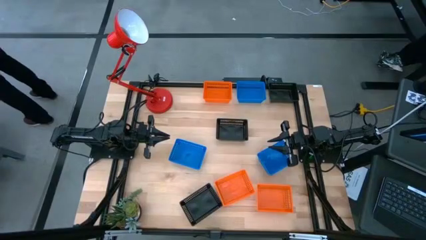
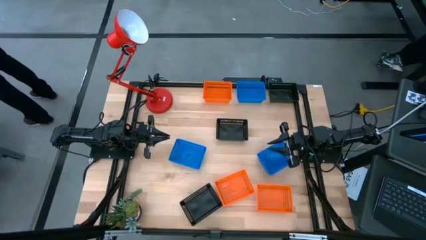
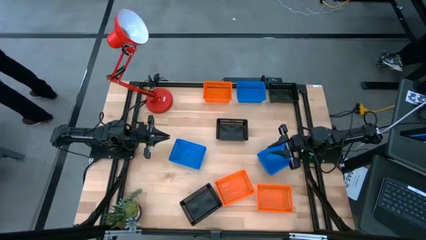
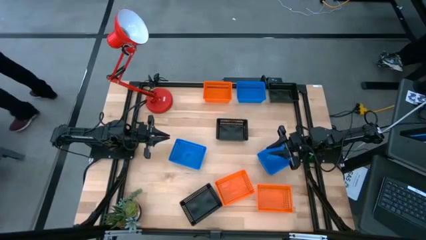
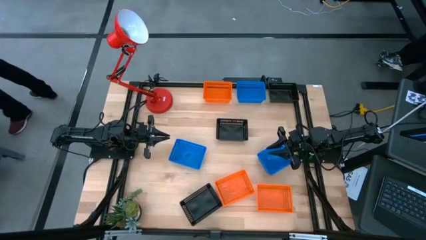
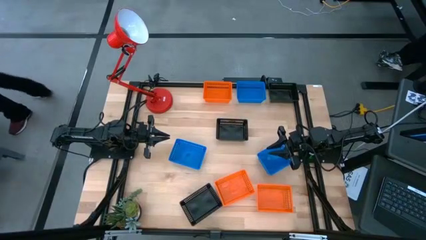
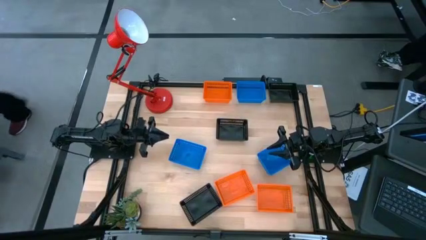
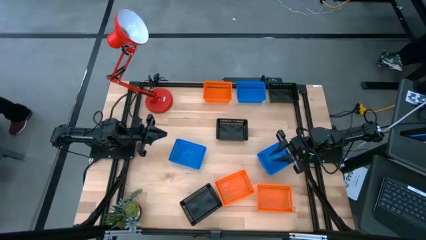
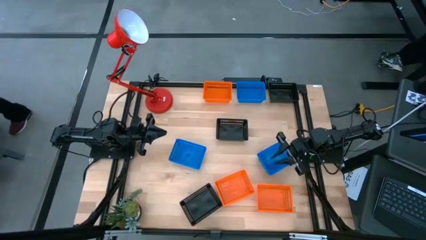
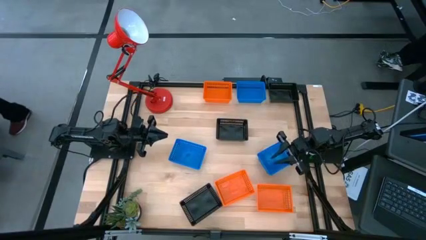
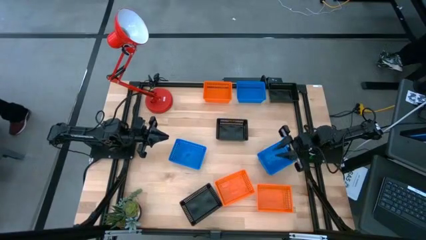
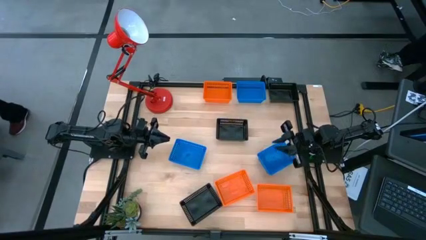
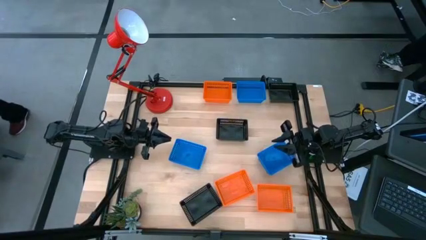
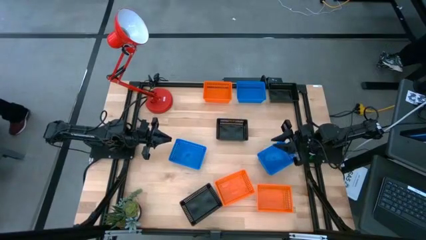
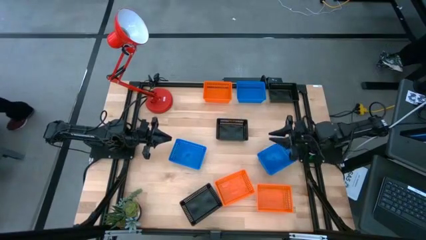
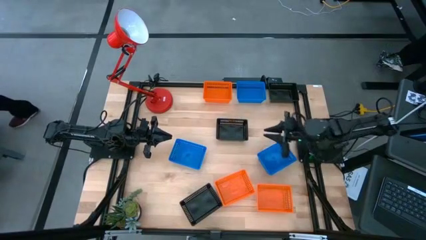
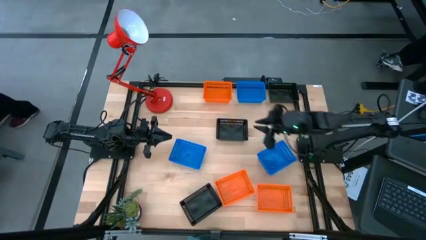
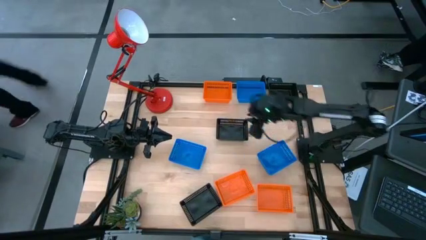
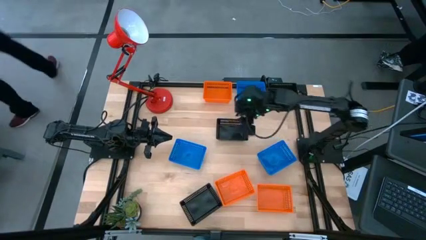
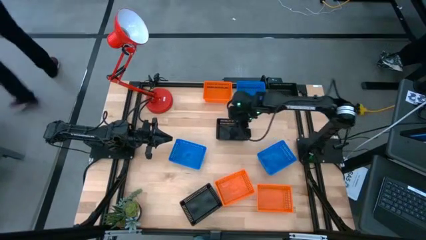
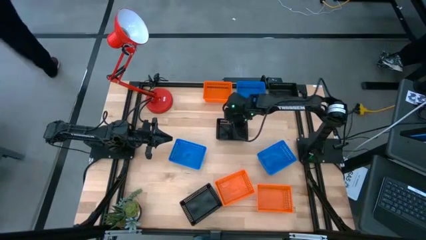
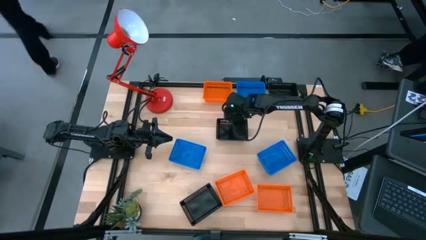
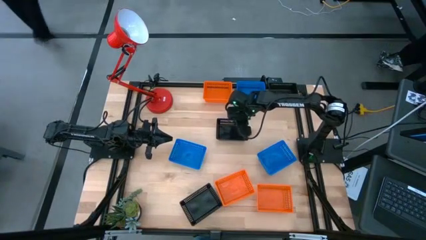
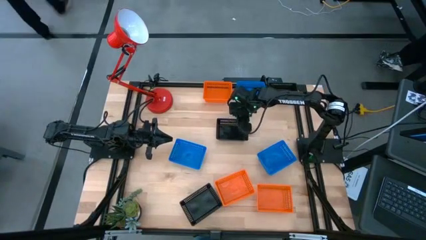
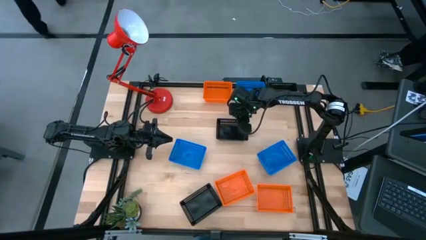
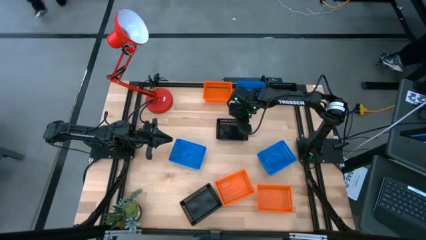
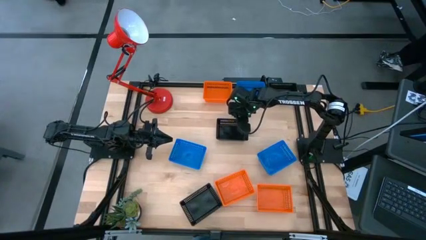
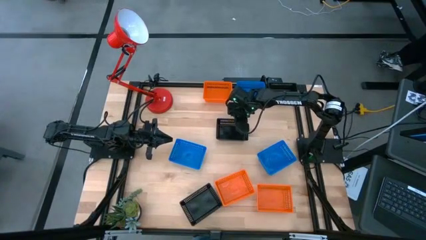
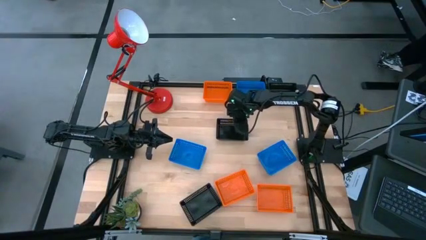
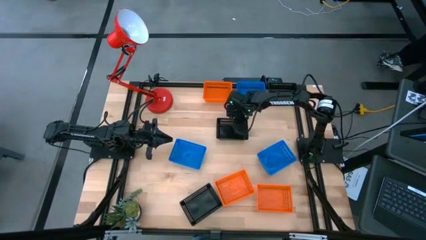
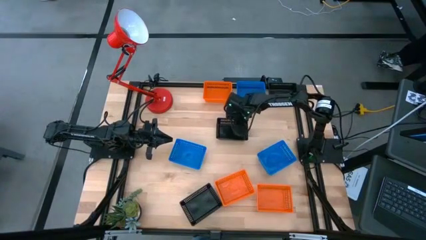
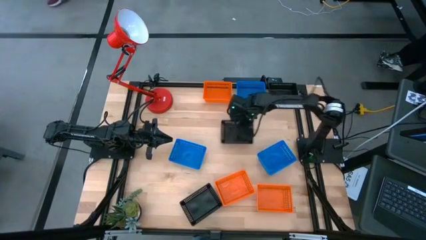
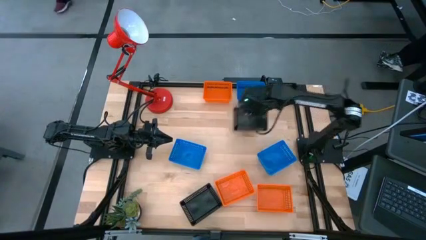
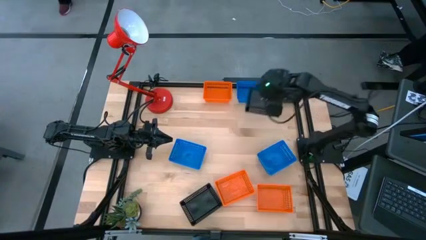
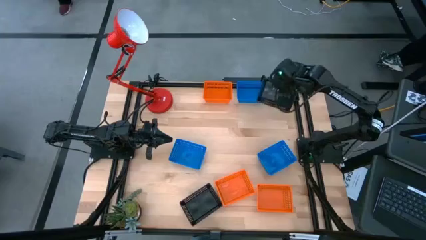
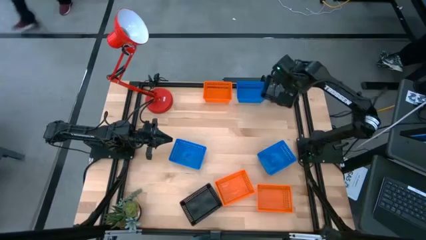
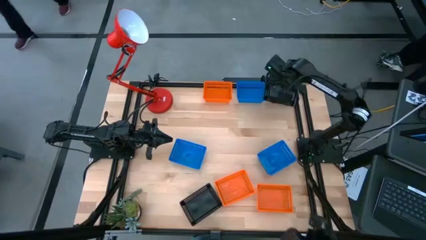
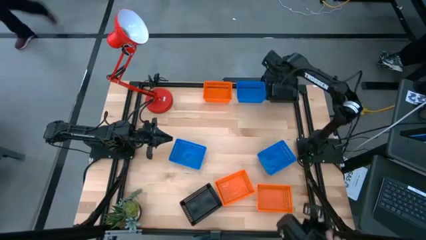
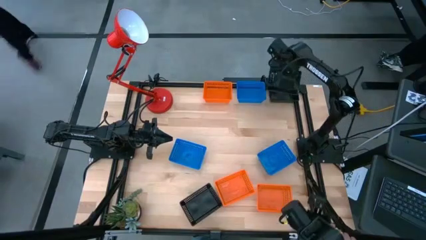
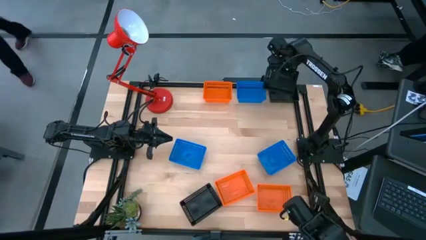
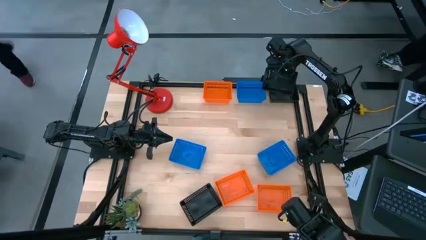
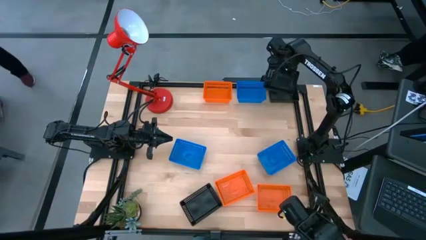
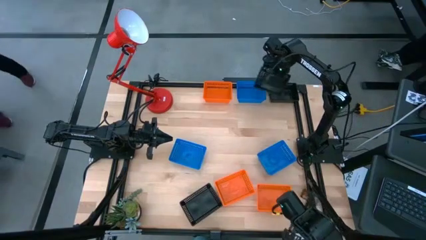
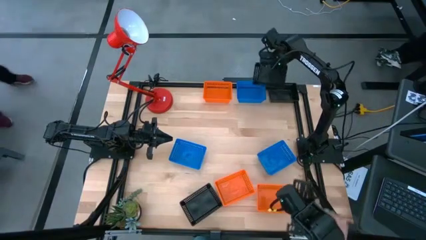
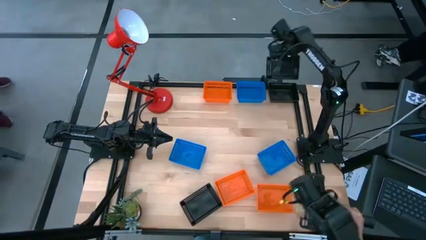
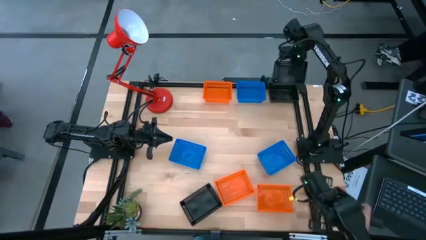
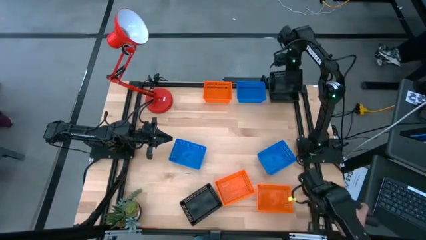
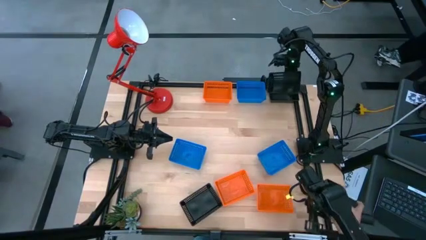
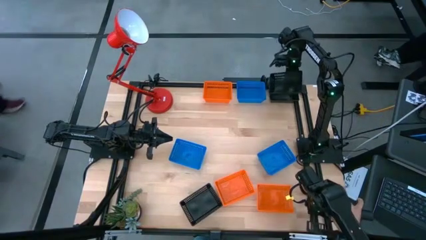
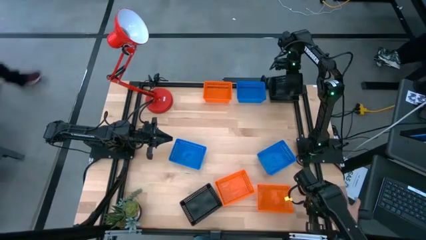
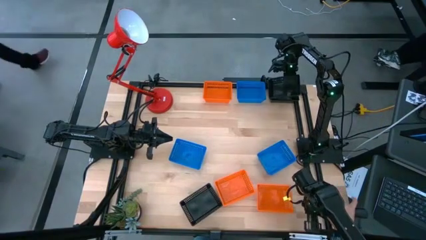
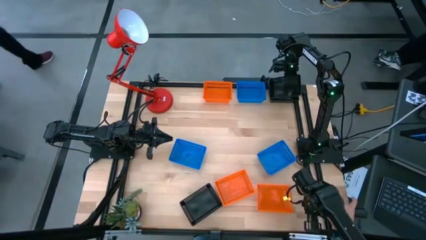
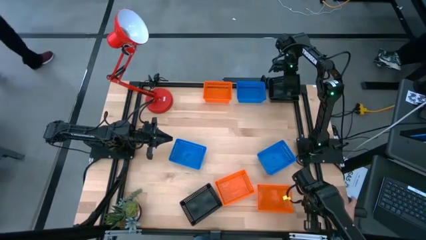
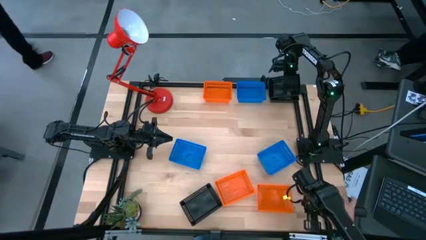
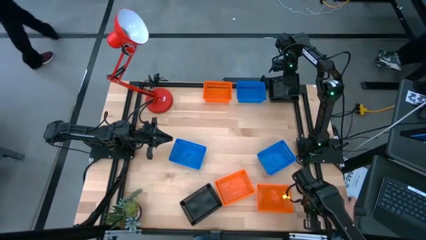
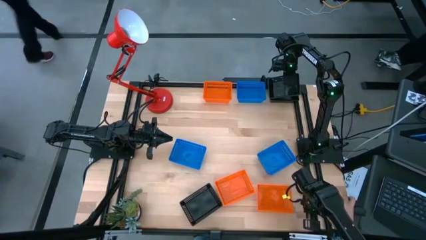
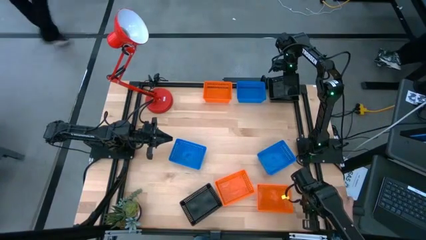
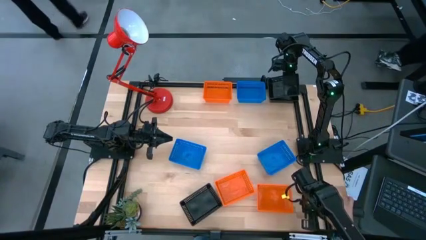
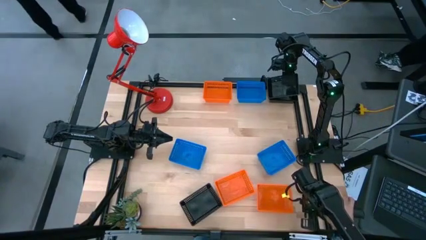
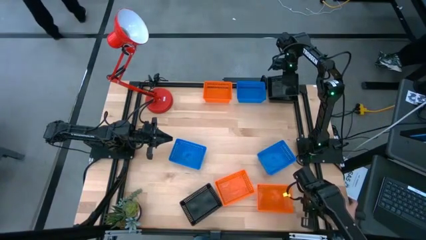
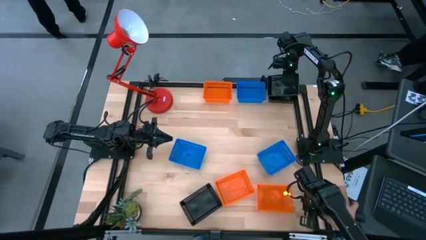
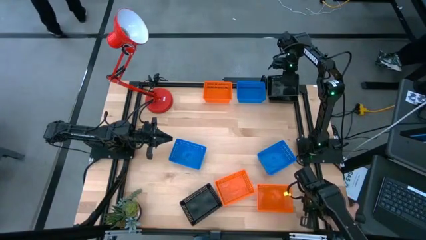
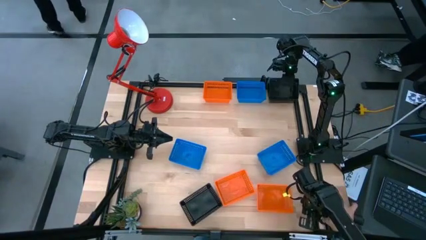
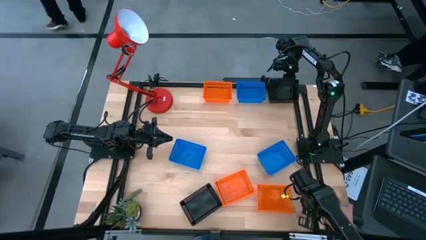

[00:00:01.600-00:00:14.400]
Stack the middle black bin on the top black bin
